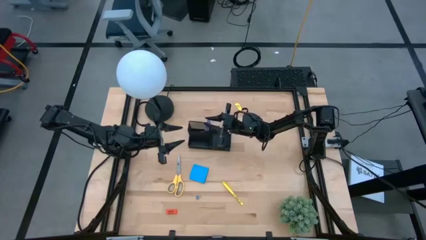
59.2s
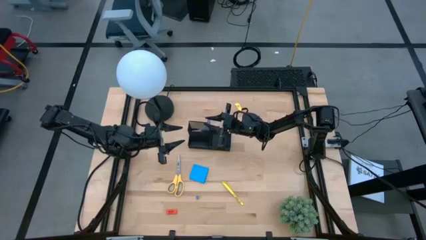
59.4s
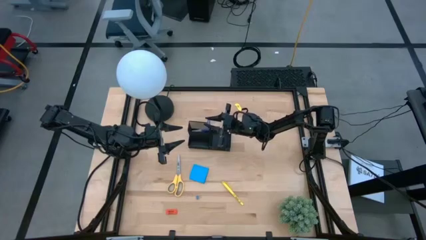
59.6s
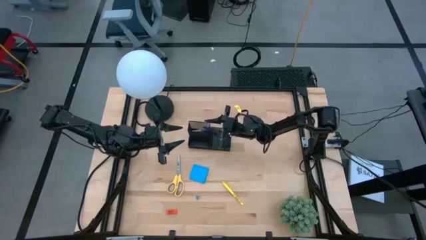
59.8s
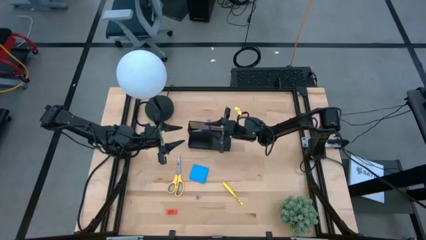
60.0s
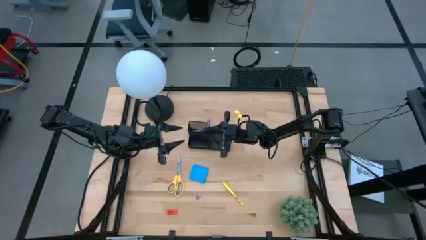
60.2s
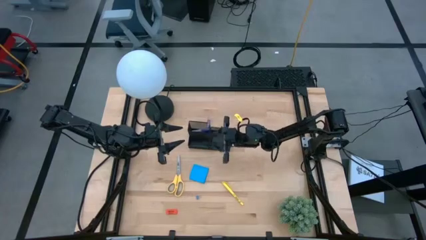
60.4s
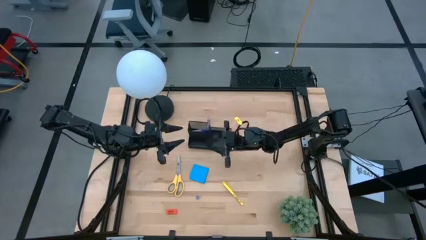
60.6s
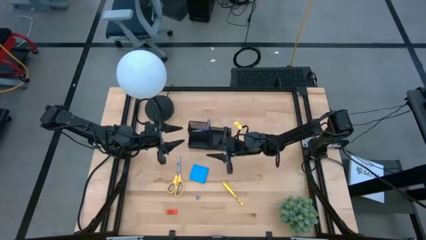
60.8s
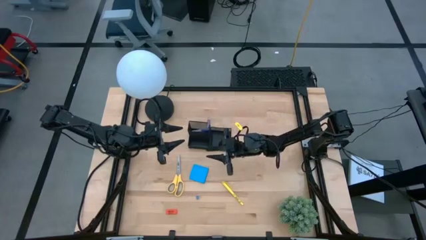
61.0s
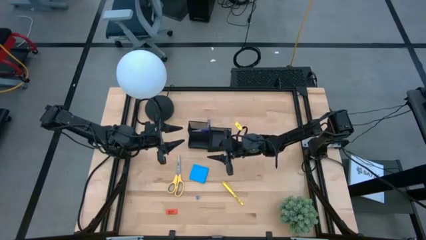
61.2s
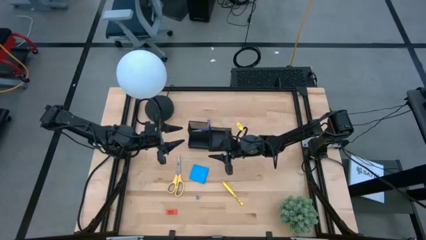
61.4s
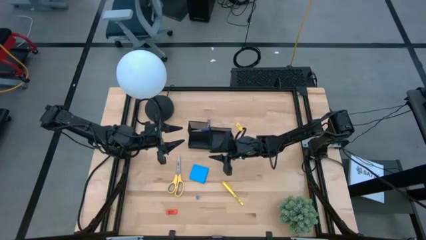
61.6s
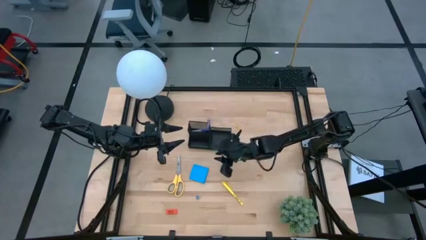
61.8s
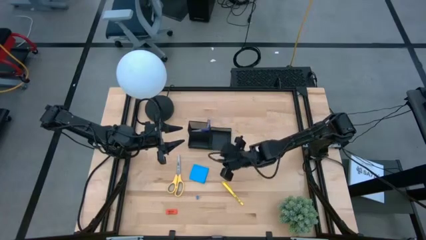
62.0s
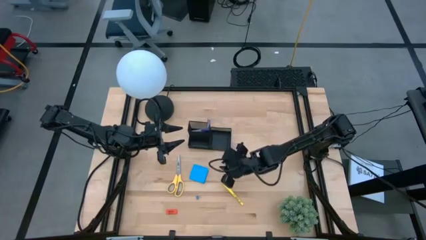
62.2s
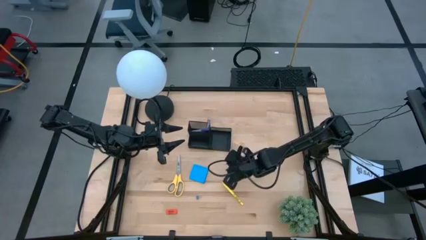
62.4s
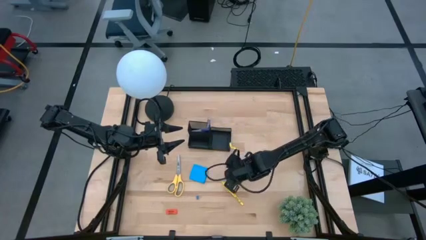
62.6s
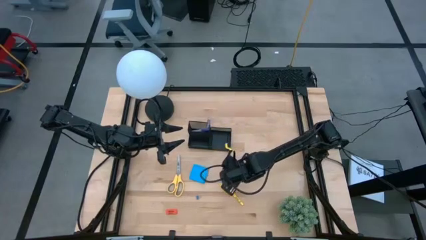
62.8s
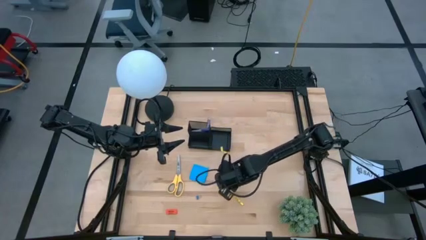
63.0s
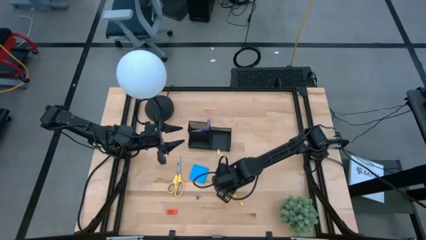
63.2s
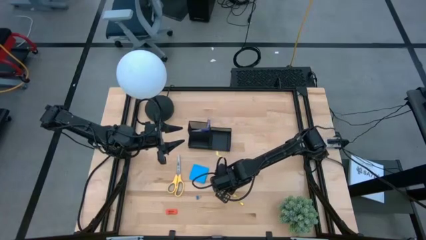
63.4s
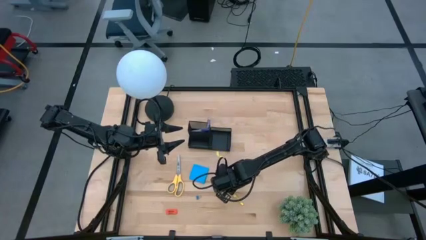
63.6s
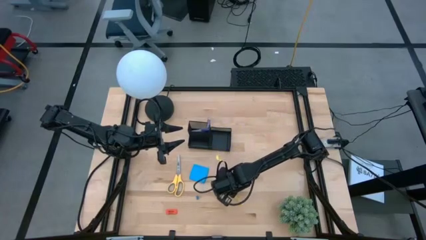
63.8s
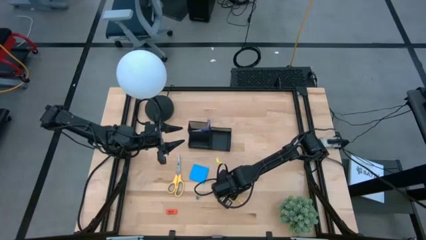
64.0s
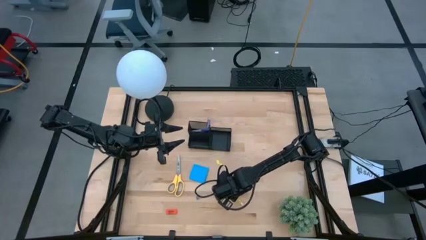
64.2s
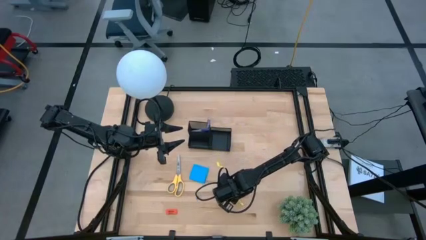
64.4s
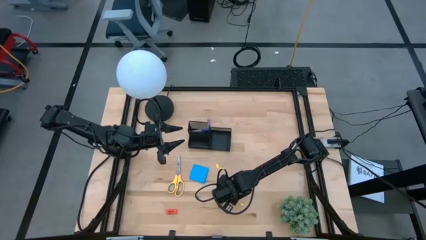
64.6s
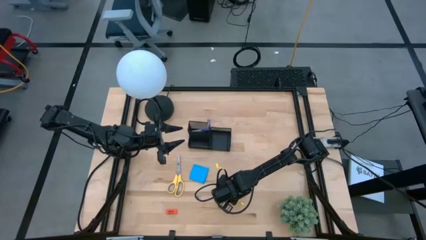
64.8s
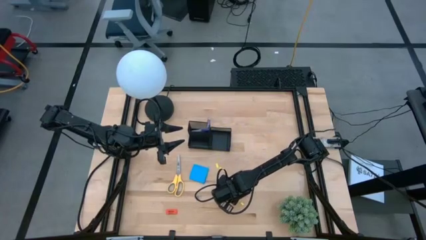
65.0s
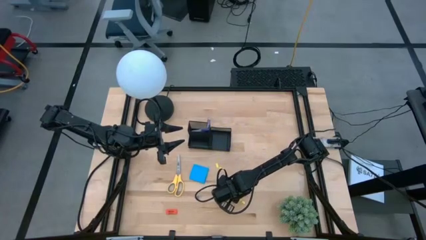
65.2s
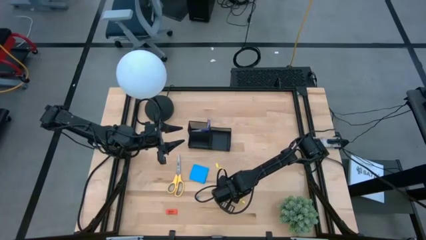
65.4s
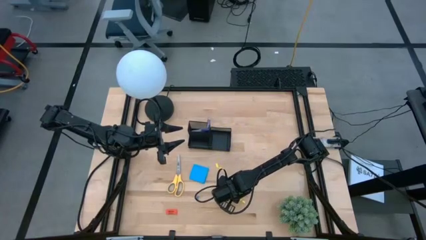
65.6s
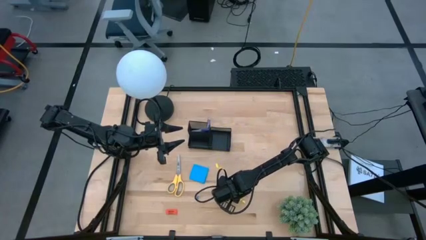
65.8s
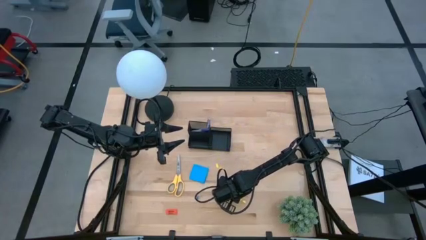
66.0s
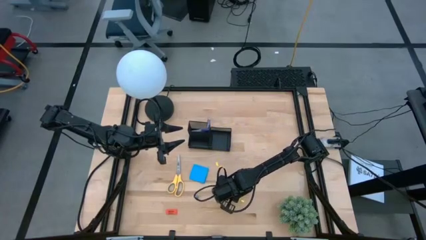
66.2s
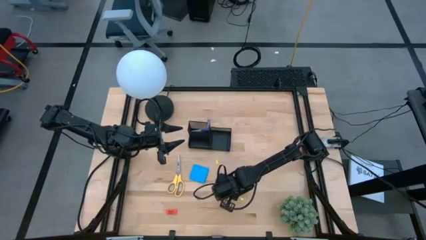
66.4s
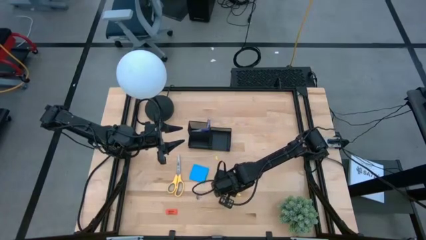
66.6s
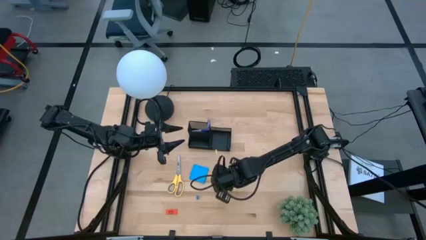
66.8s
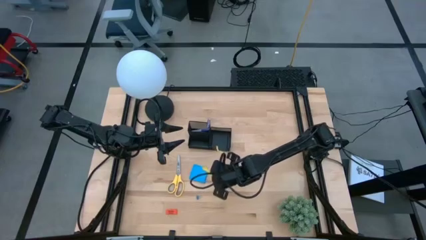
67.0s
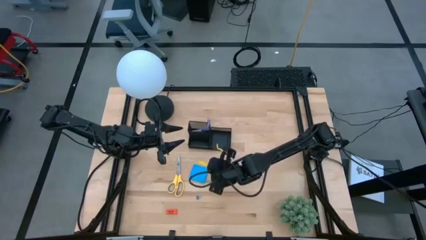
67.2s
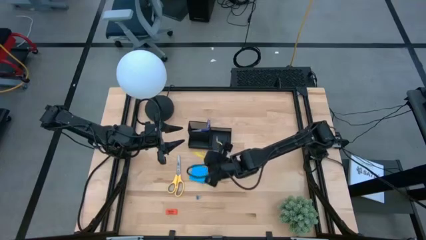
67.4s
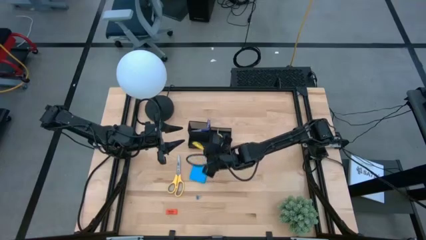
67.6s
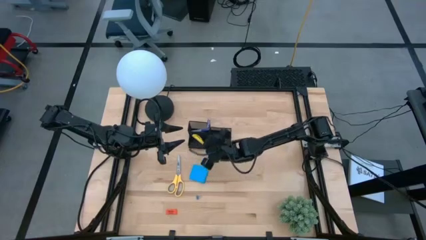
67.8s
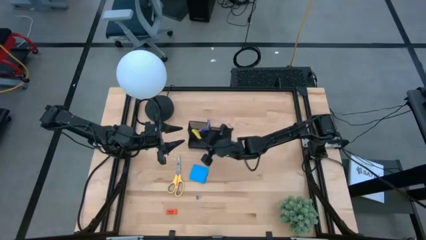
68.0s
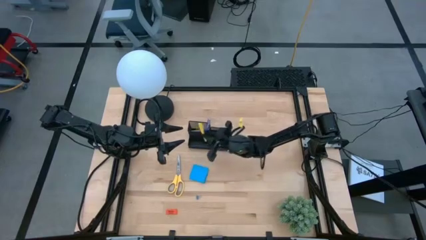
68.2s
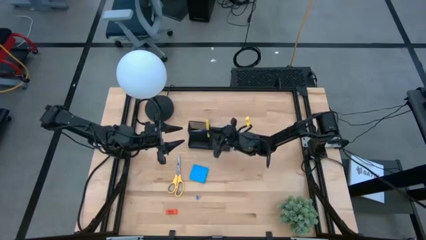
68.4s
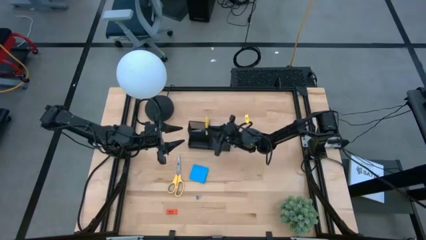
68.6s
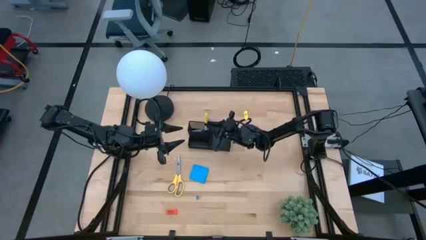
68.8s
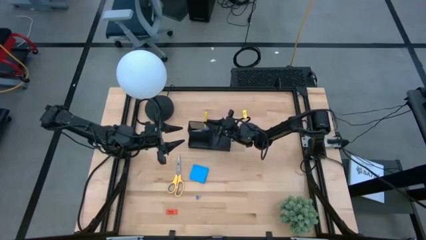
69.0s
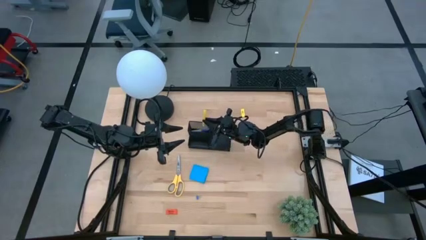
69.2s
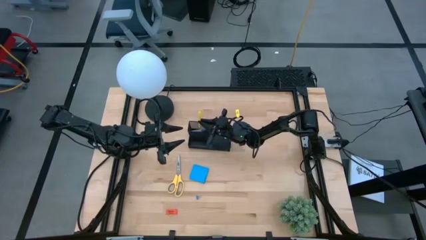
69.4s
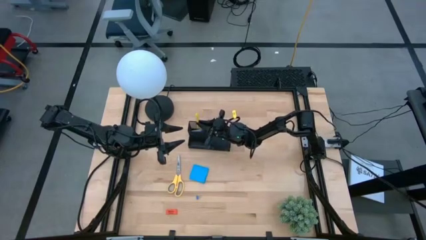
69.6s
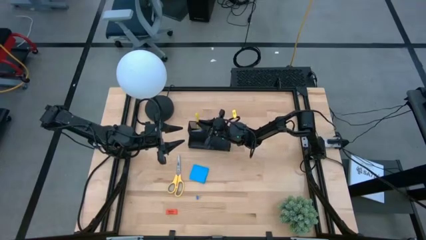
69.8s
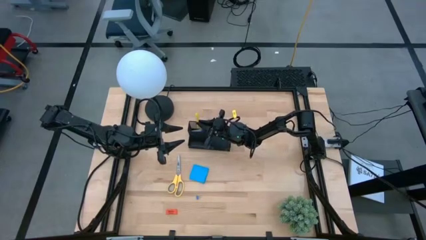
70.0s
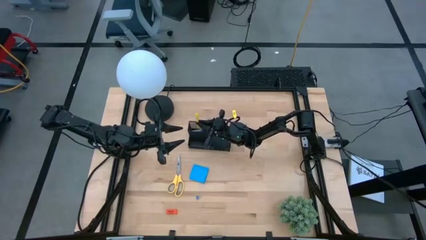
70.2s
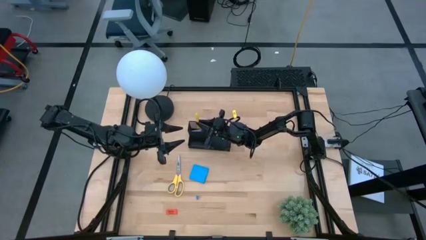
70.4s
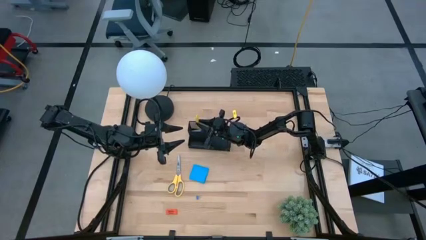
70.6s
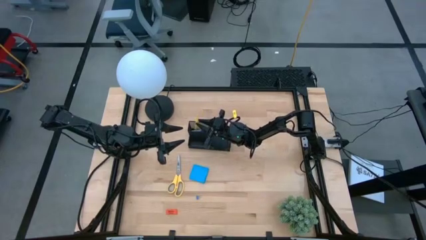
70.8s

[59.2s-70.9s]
Task: Pick and place office supplies into organizer
Put the yellow pen into the black mesh desk organizer
